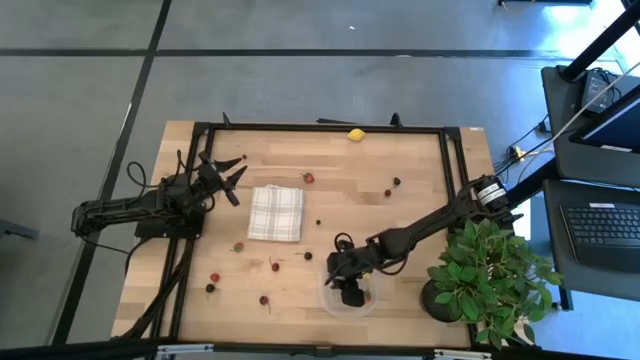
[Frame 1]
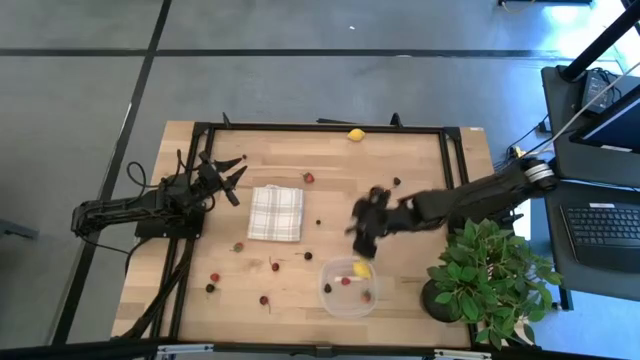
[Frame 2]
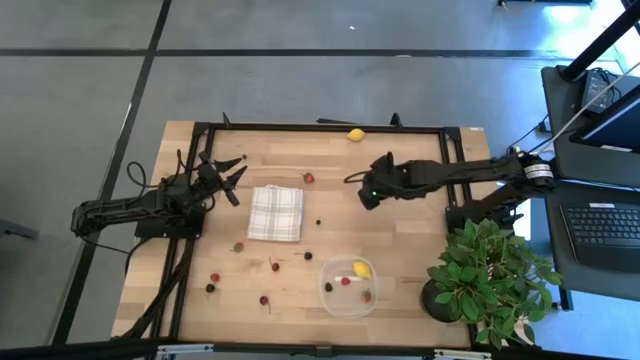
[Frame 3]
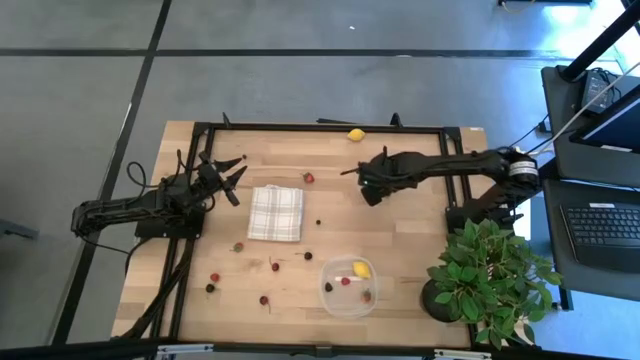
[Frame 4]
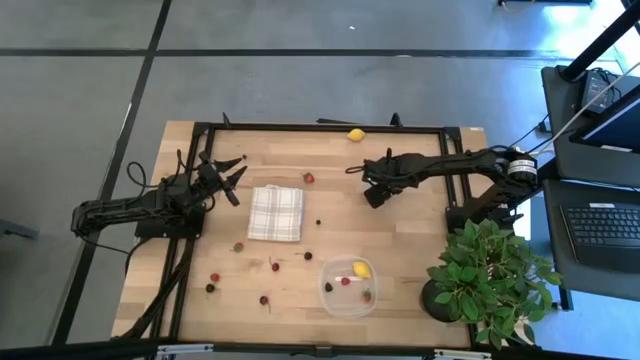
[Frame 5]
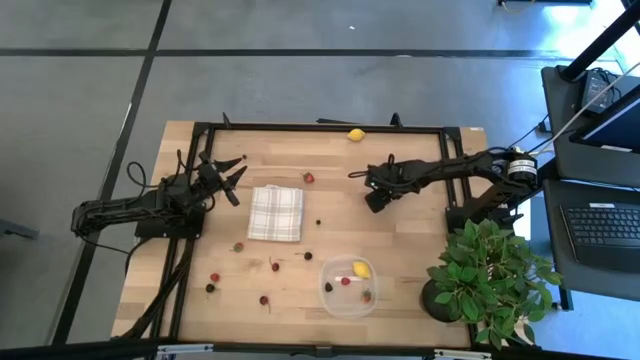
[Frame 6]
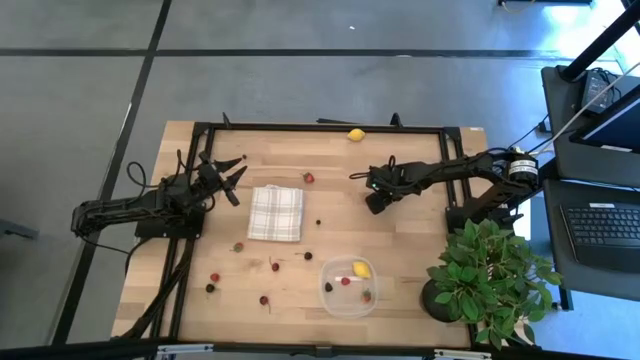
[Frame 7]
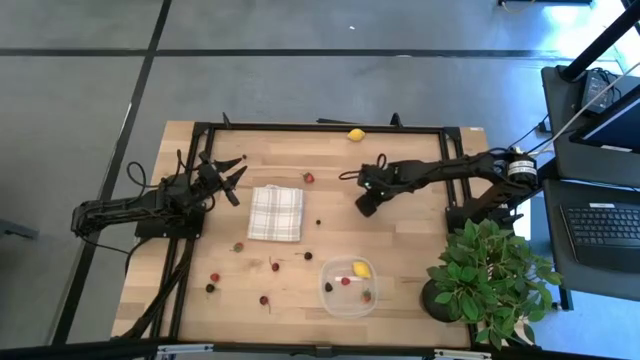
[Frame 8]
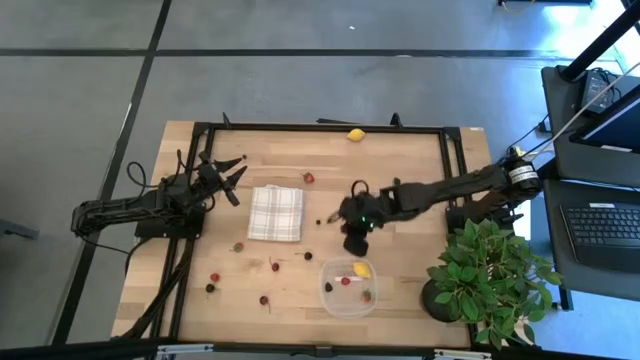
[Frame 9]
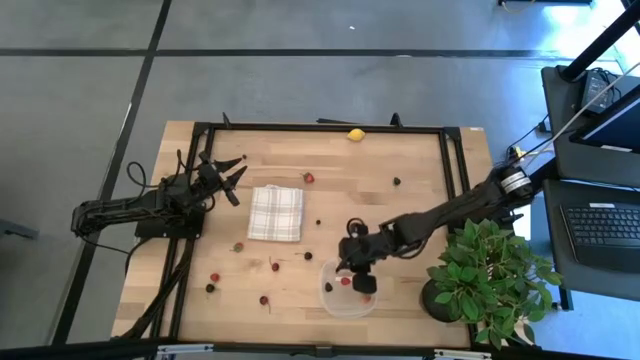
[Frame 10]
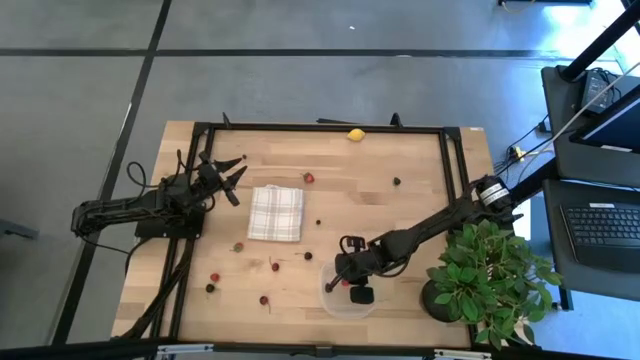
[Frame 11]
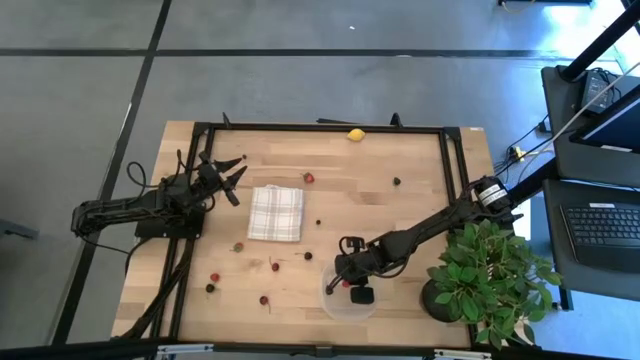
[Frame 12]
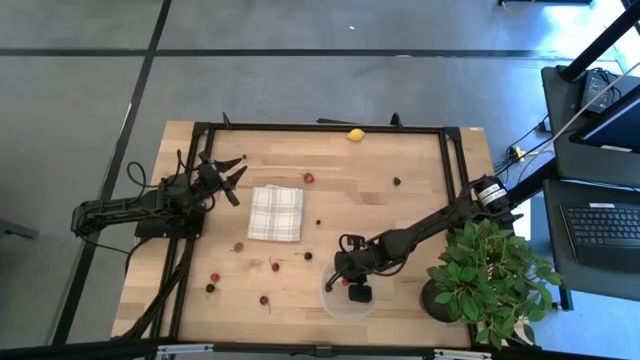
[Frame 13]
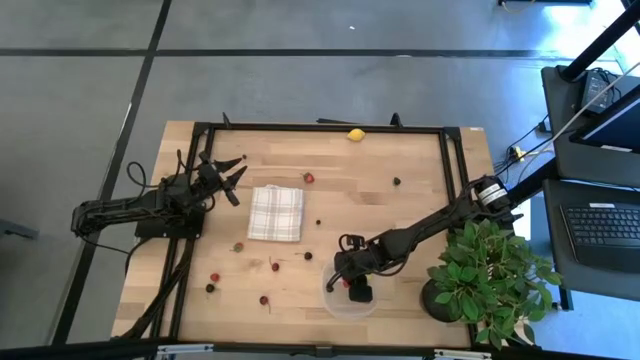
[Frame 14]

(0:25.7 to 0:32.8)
Task: Pick and placing Produce into tupperware
Put the top right red cherry into the transparent container

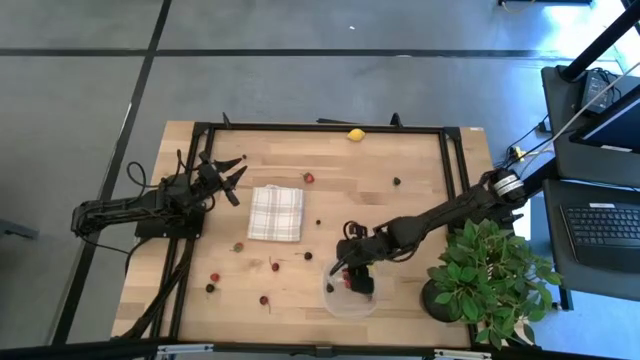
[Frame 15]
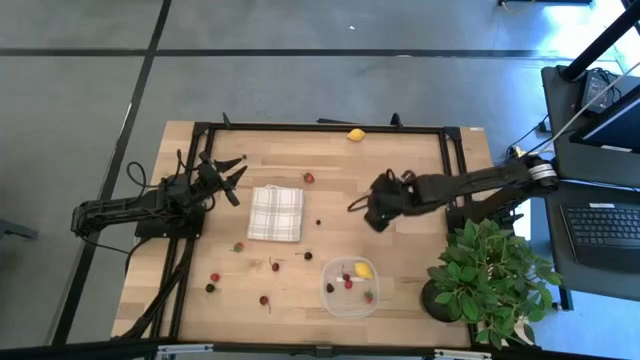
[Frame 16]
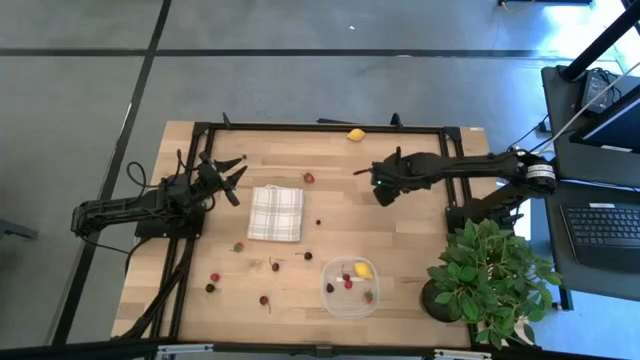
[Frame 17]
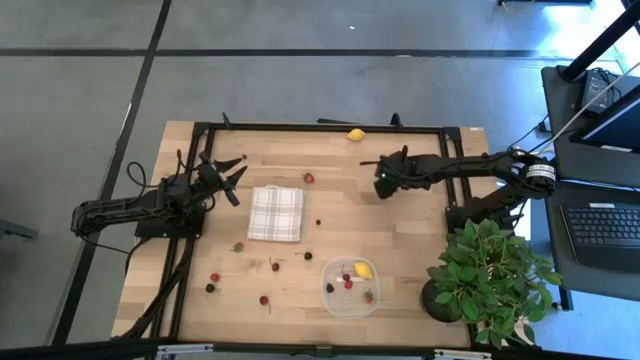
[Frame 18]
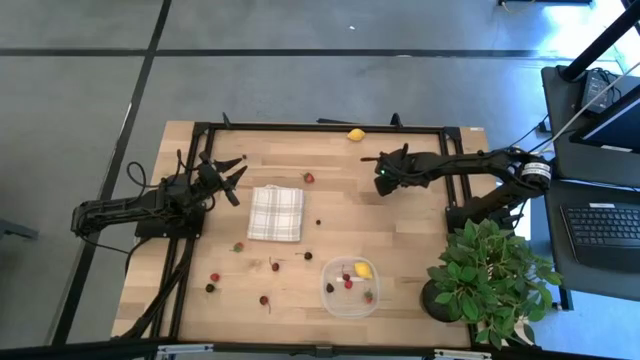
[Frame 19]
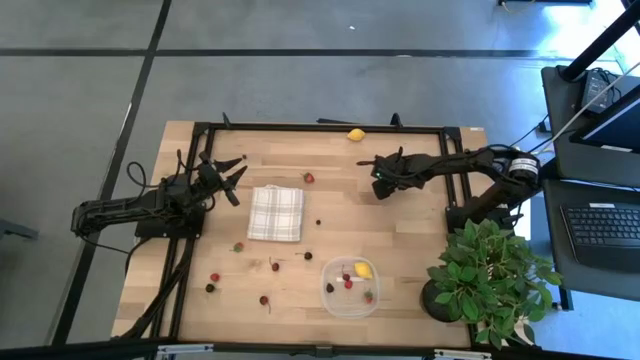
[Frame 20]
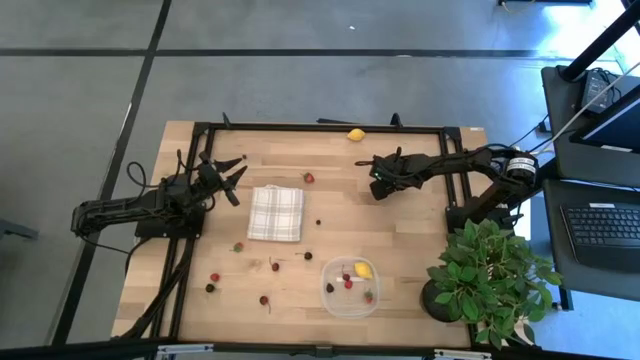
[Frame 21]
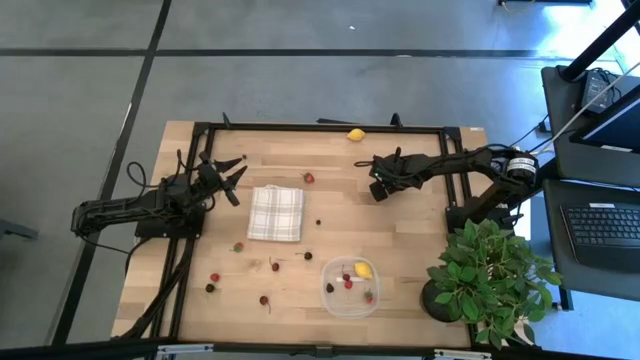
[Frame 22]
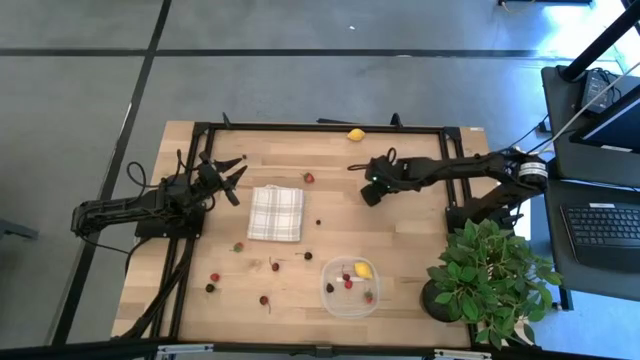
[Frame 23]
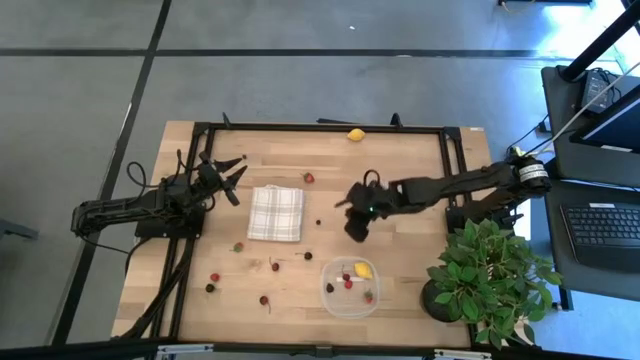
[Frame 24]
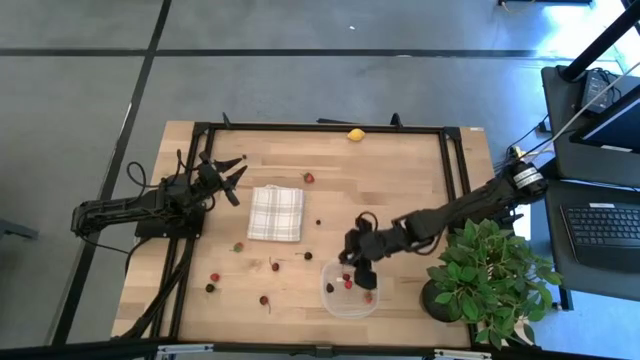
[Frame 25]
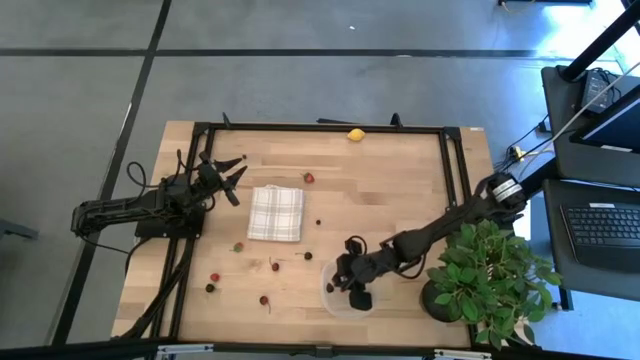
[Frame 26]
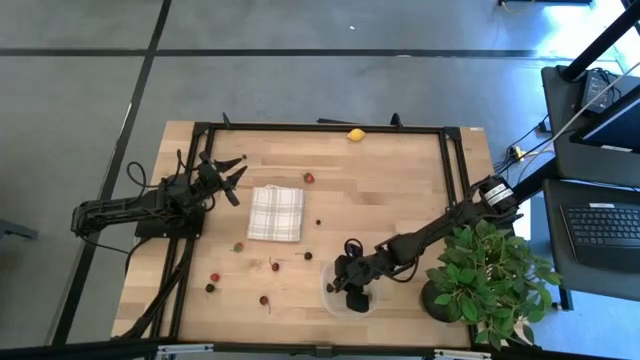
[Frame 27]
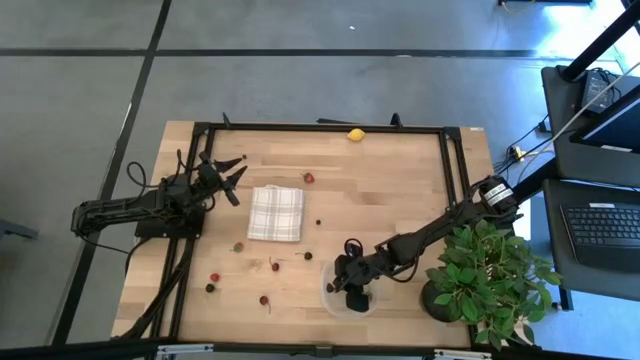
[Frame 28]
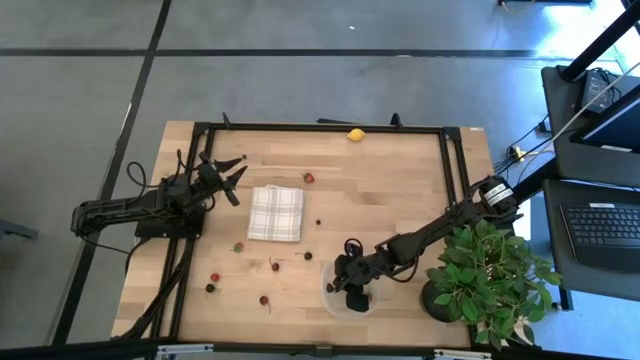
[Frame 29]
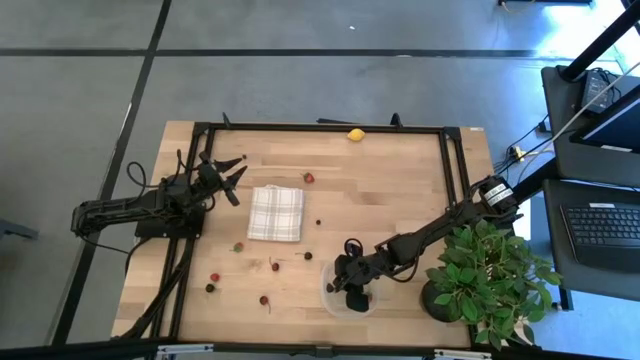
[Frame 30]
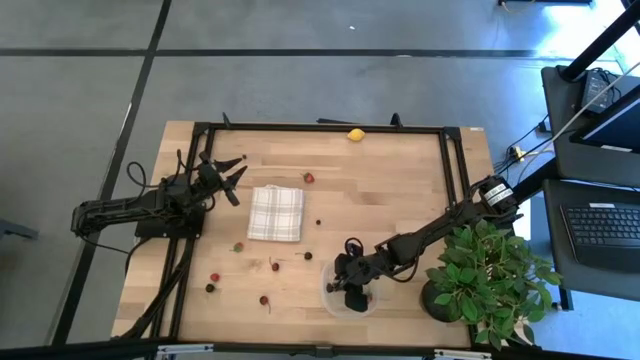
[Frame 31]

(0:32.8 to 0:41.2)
Put the blackberry into the transparent container

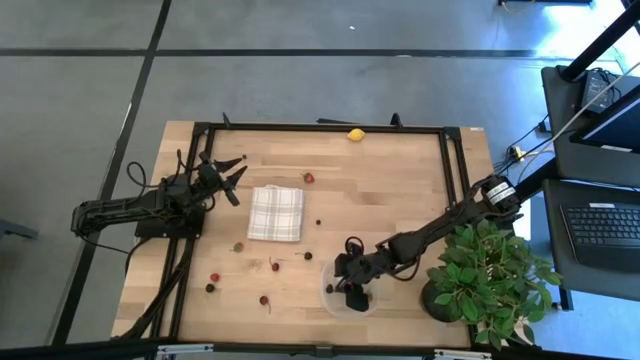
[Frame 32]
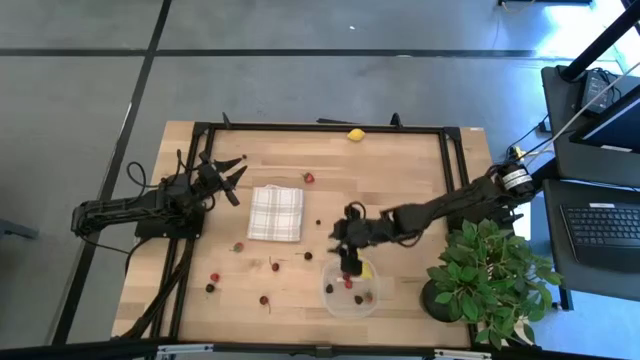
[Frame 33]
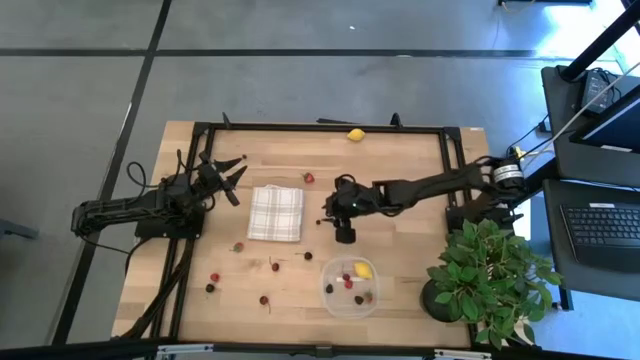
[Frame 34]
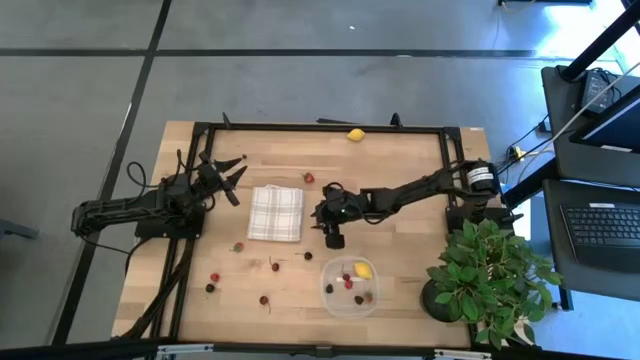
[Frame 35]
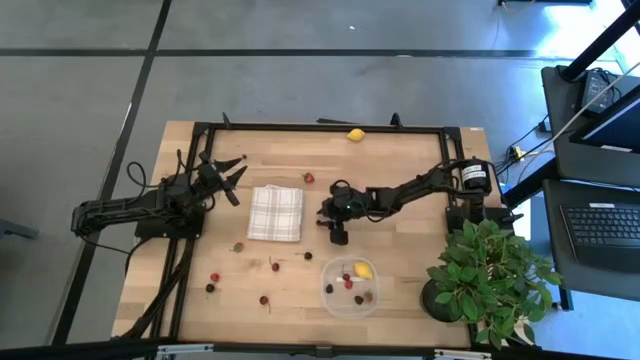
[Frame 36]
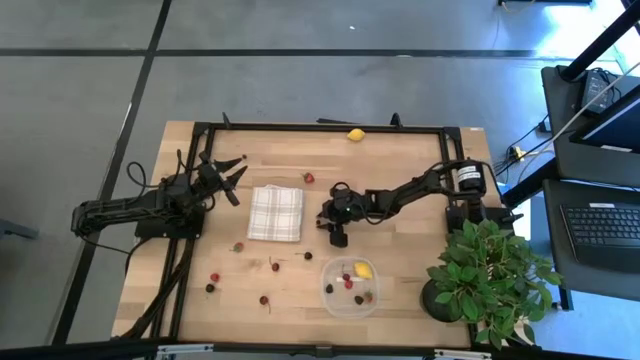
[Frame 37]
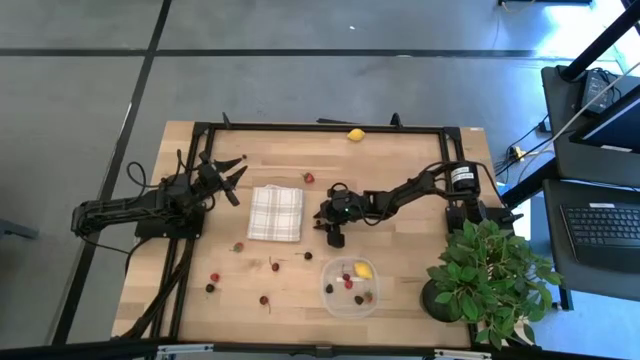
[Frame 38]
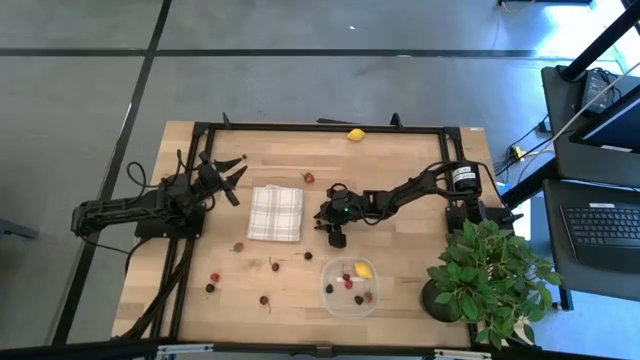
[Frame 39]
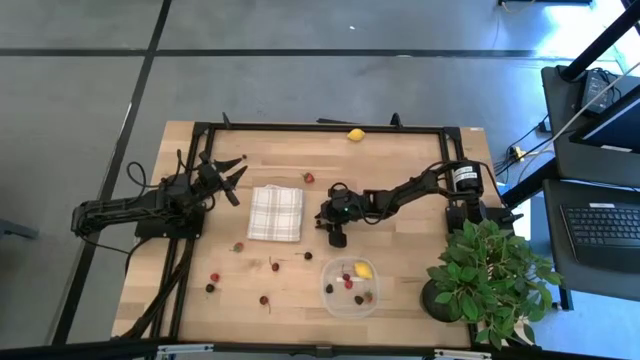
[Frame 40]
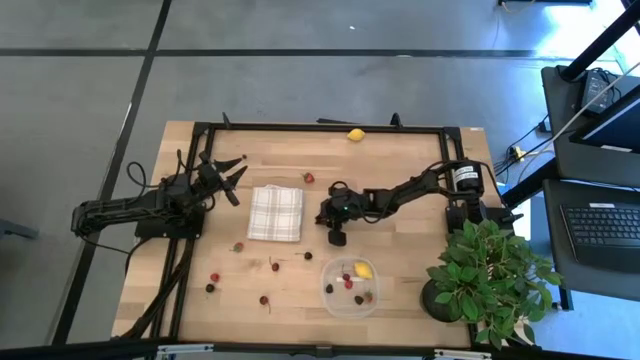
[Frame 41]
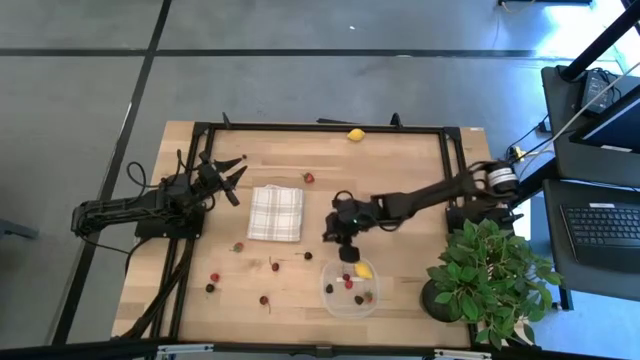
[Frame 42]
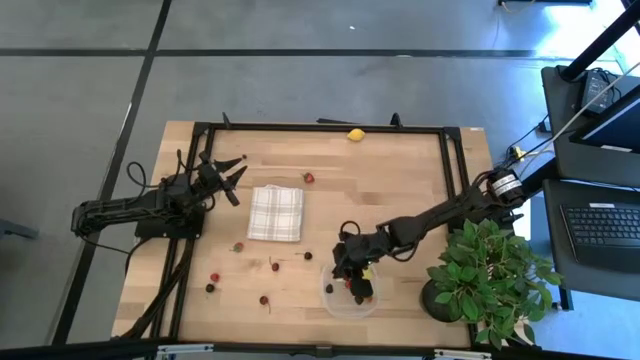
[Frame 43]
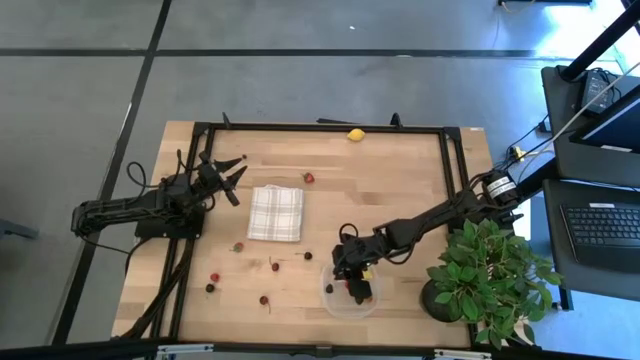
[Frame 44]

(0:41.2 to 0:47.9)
Put the bottom blueberry into the transparent container
